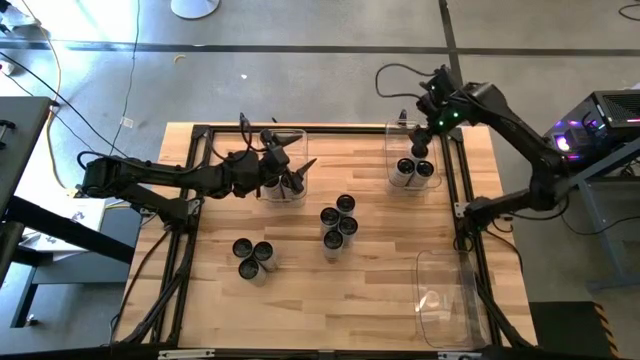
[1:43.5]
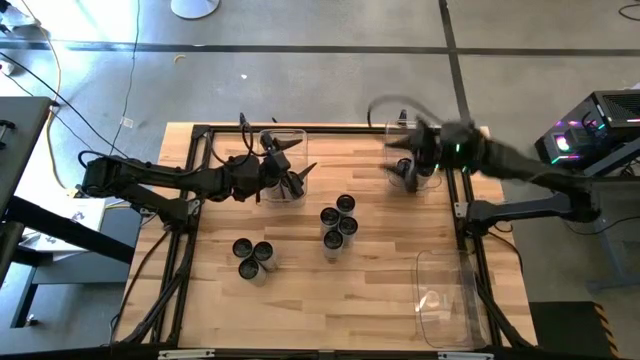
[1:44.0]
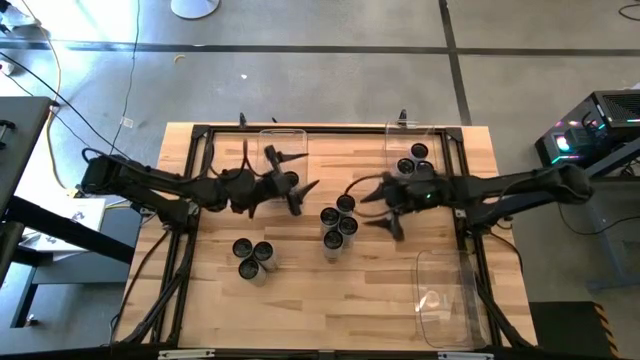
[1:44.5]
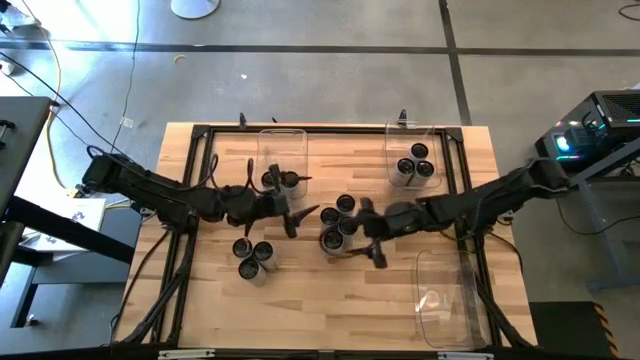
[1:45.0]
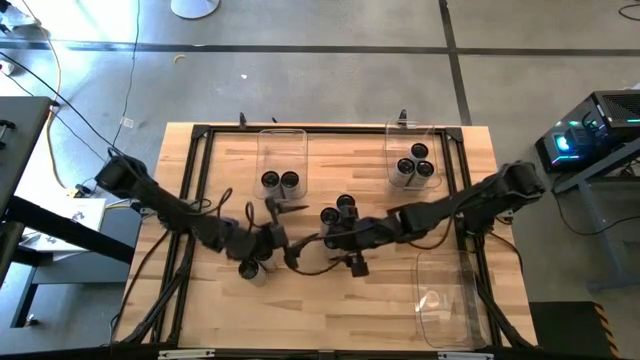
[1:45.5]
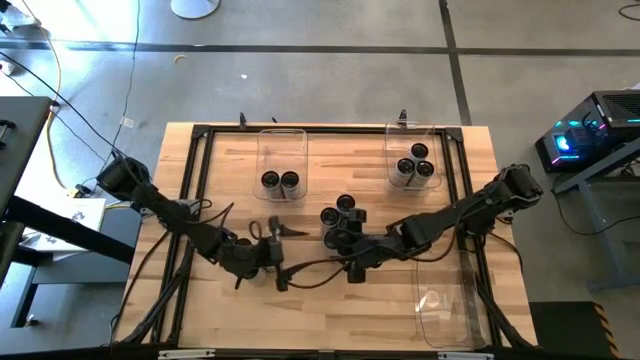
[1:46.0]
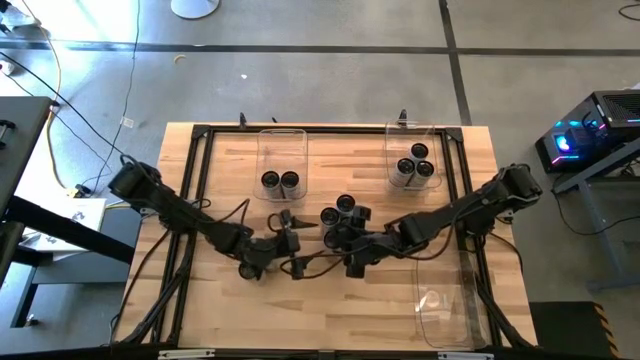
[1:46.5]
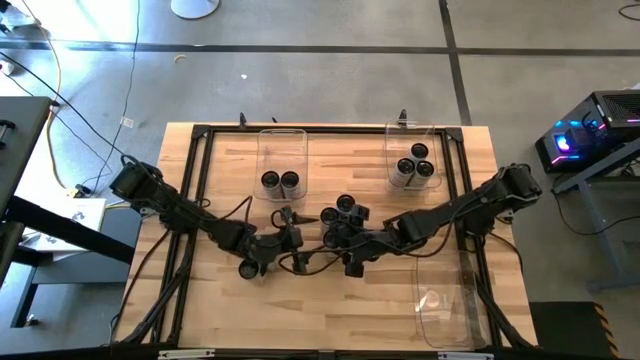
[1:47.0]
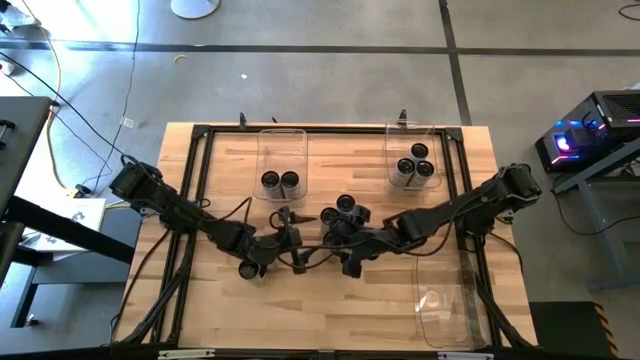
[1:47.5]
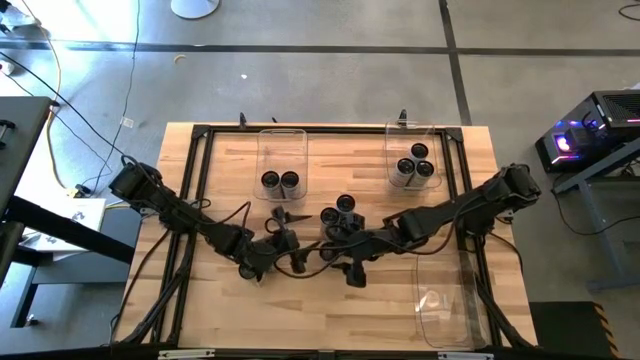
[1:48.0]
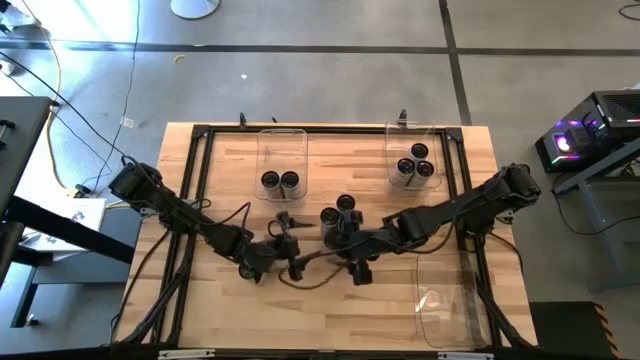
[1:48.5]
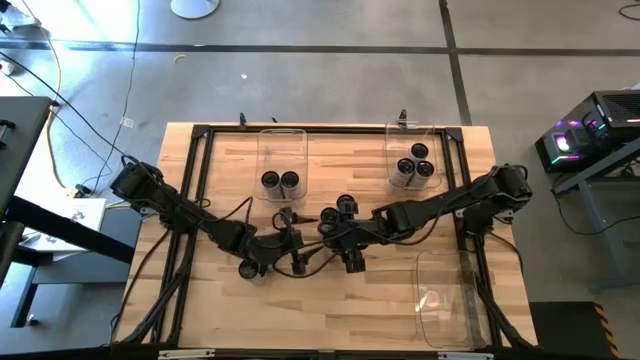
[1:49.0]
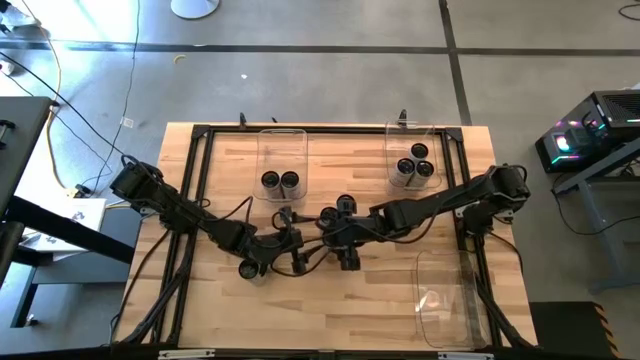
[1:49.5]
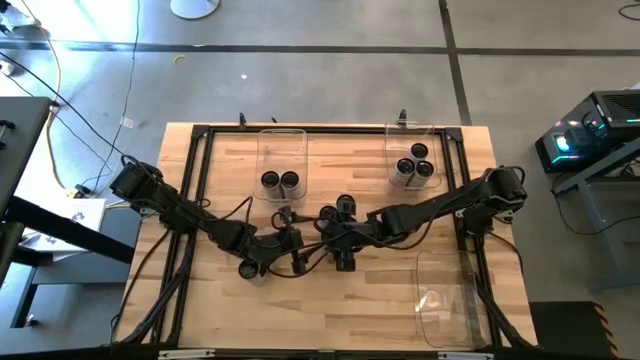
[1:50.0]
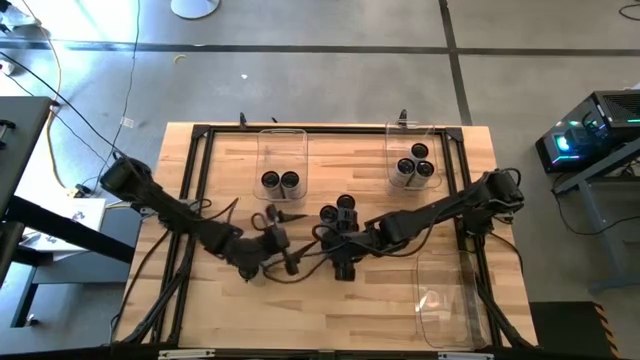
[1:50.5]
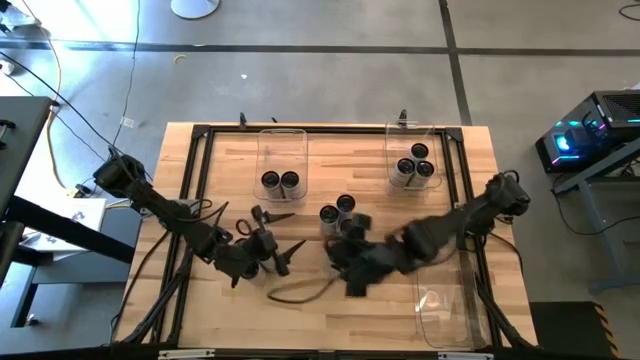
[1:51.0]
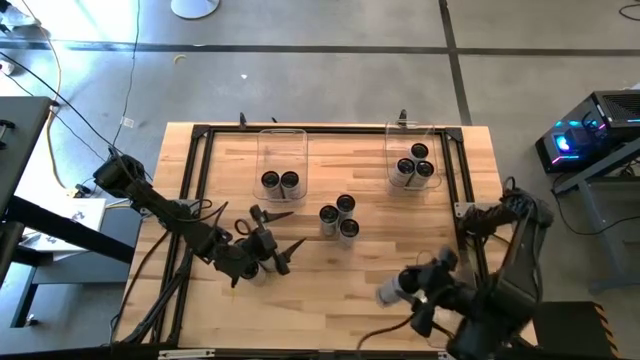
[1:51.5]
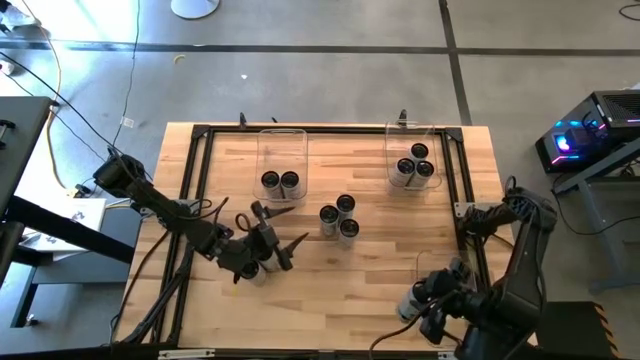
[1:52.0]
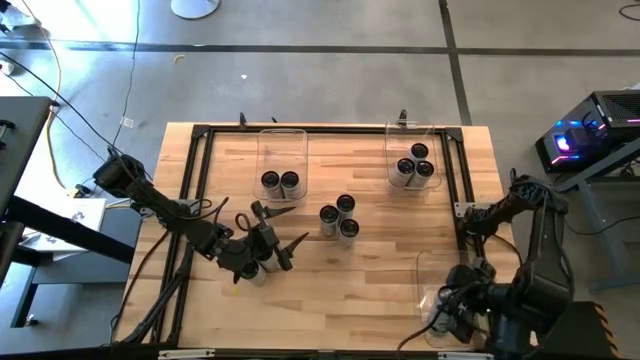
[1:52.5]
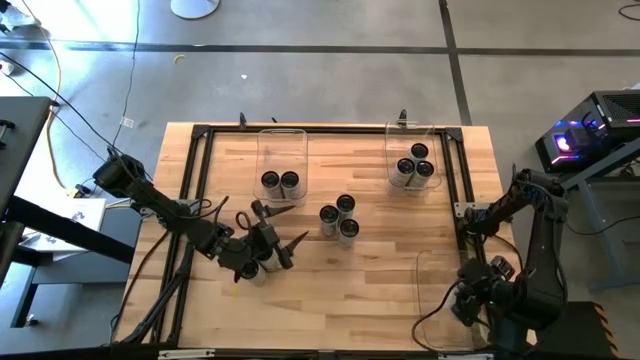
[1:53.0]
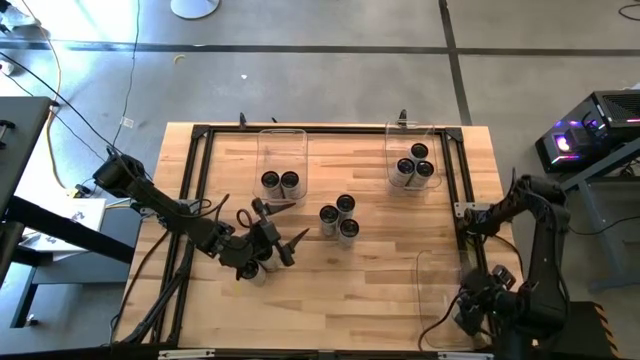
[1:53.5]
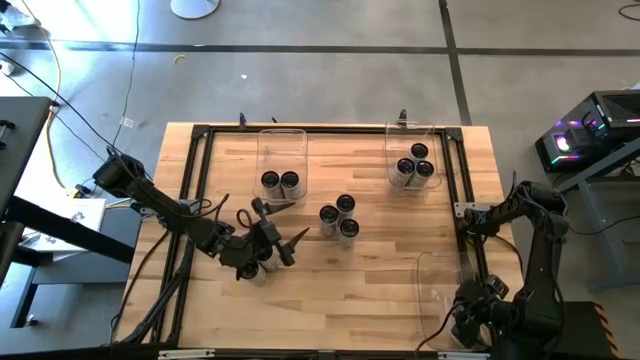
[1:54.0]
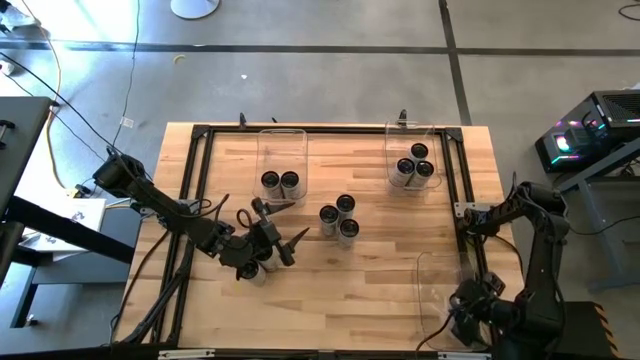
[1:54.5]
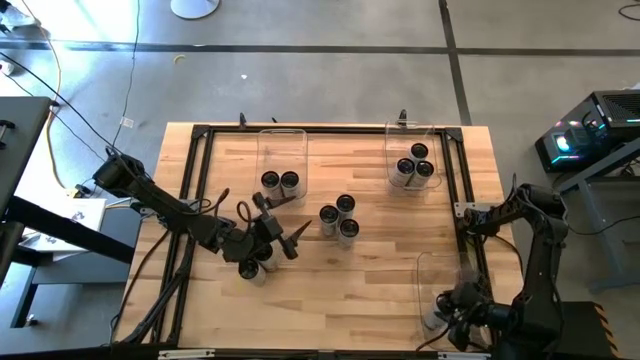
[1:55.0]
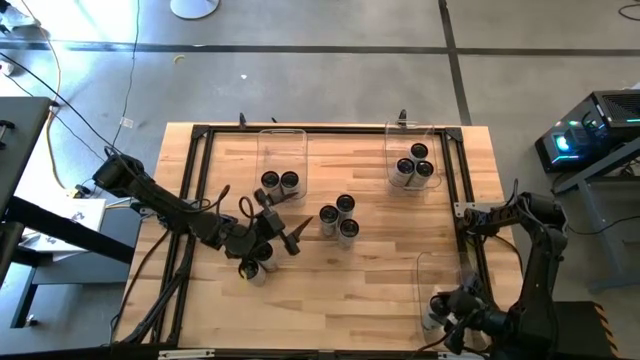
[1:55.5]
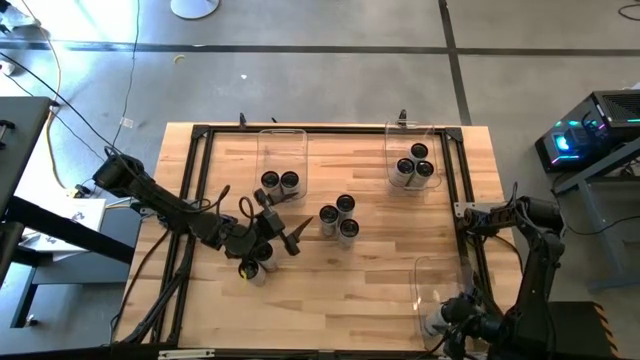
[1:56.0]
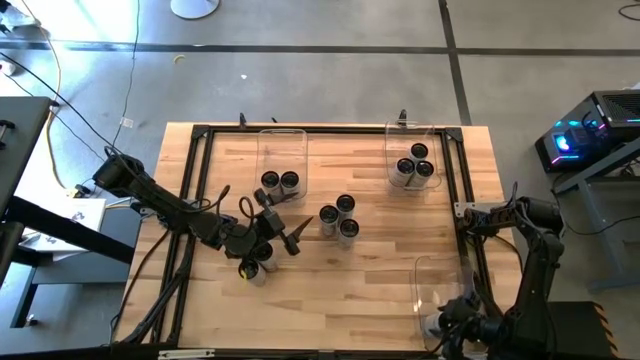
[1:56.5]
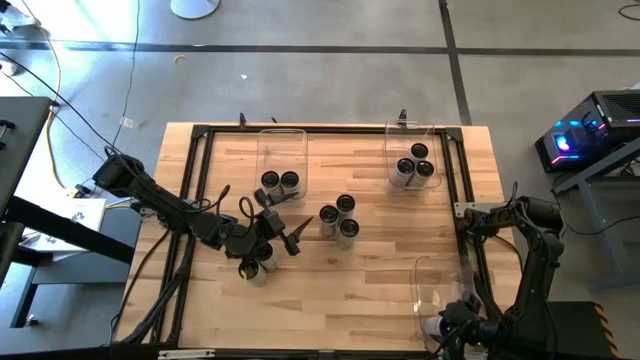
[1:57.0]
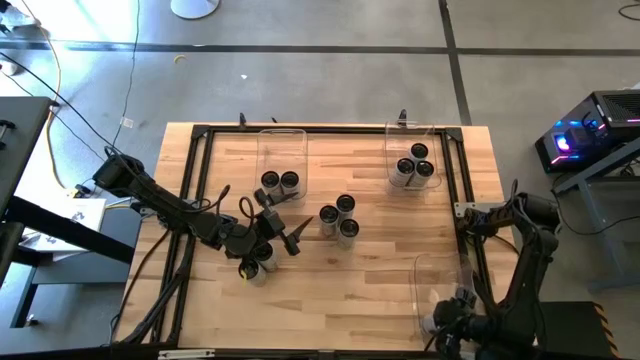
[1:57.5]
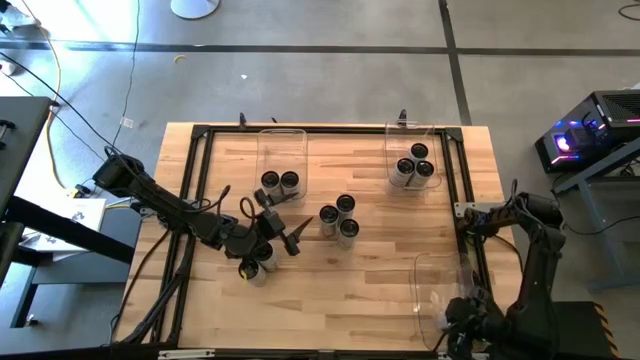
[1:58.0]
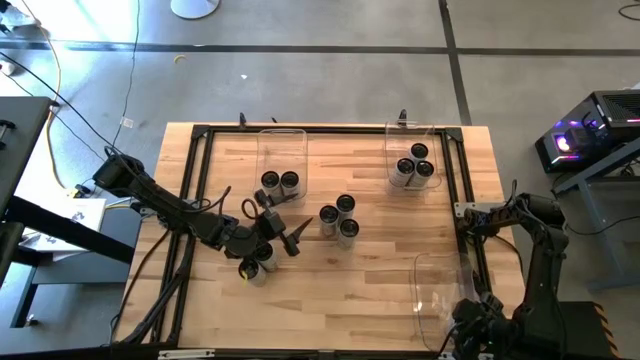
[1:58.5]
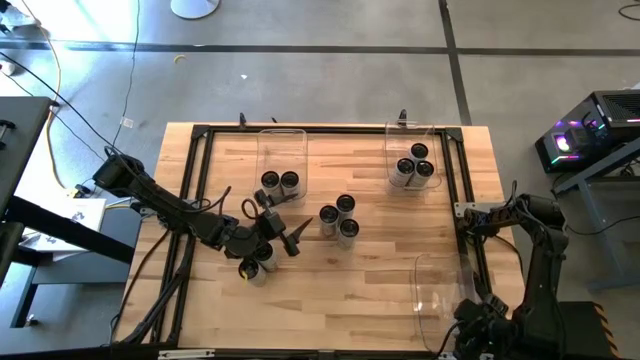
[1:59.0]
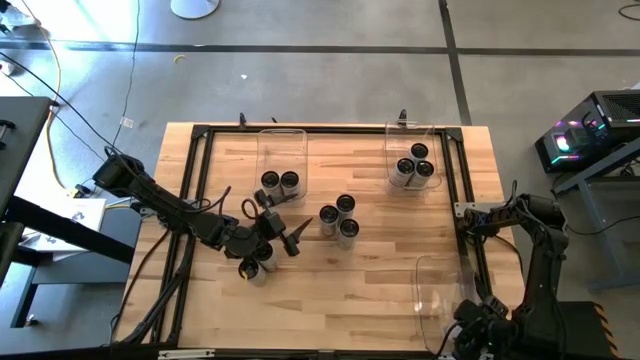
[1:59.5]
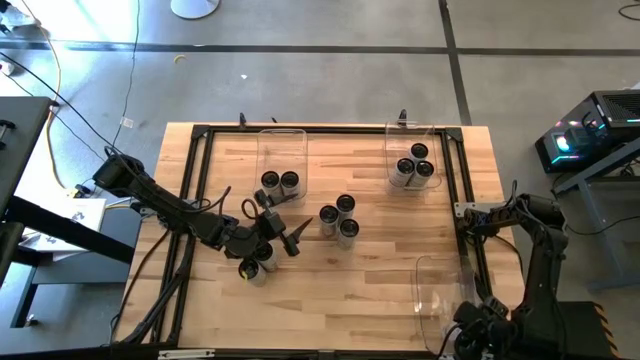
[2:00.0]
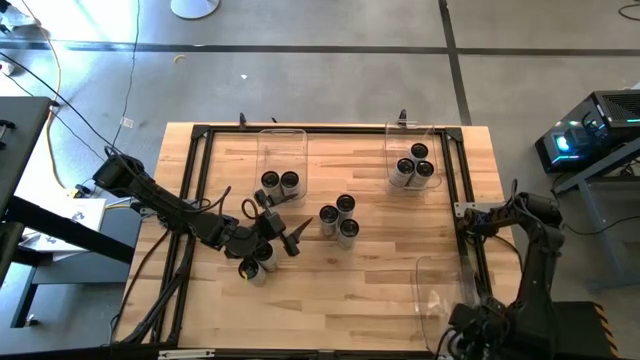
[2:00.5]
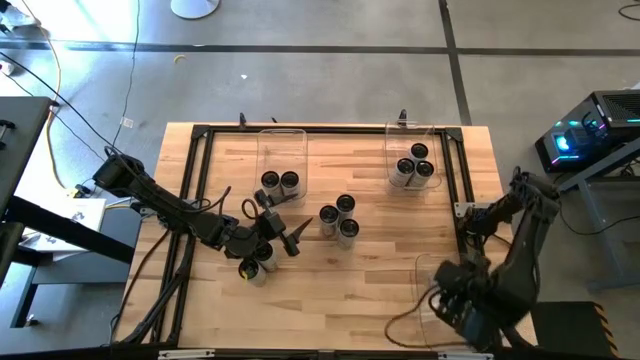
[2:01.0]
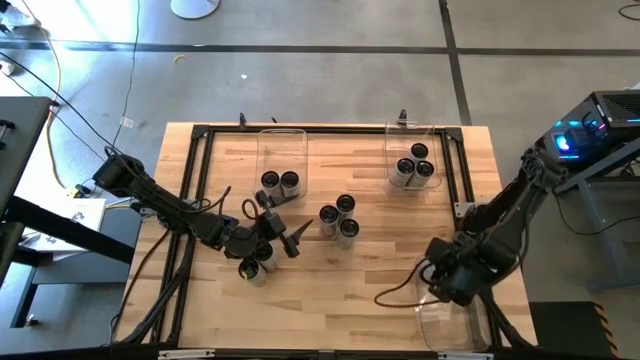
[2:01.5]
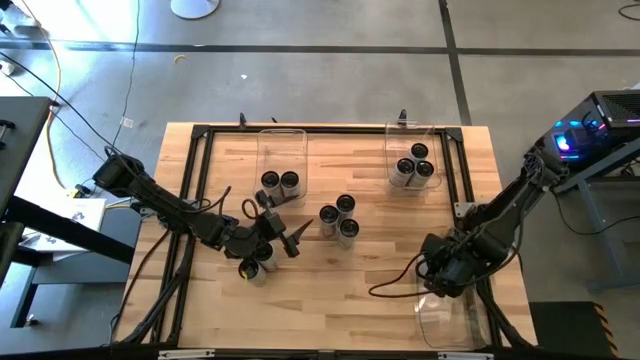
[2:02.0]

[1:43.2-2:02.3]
Task: Sort soda cans
Put the white-blue soda can into the bottom transparent bin

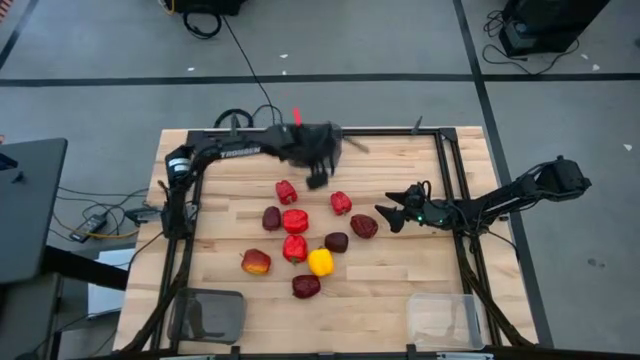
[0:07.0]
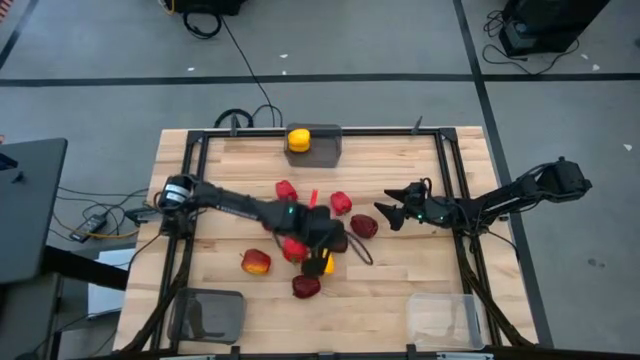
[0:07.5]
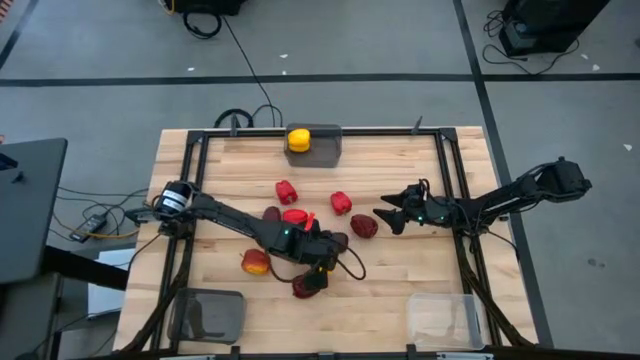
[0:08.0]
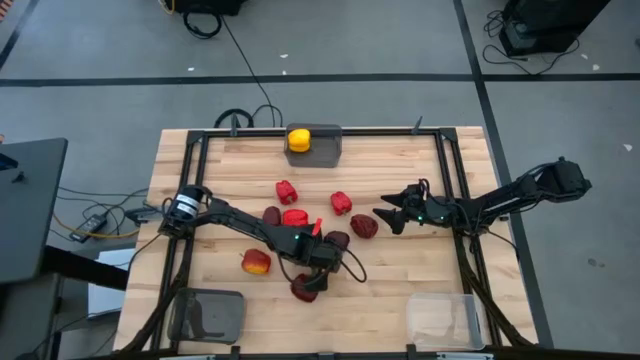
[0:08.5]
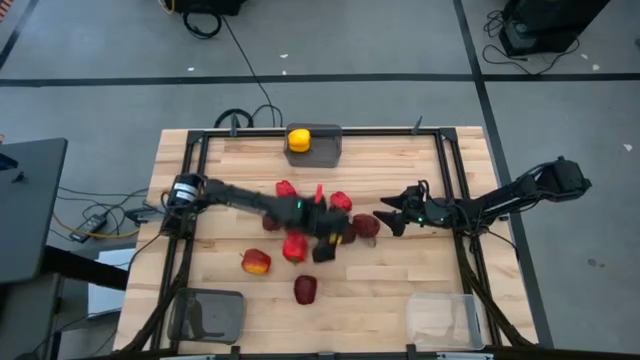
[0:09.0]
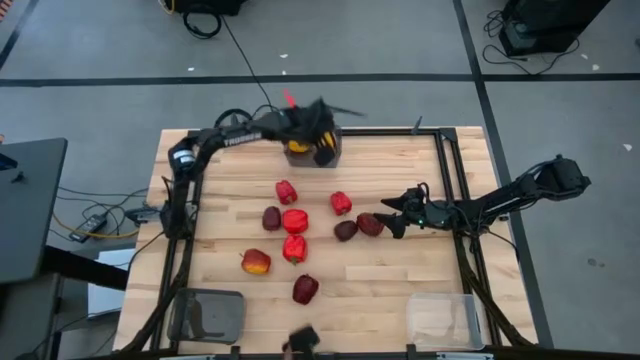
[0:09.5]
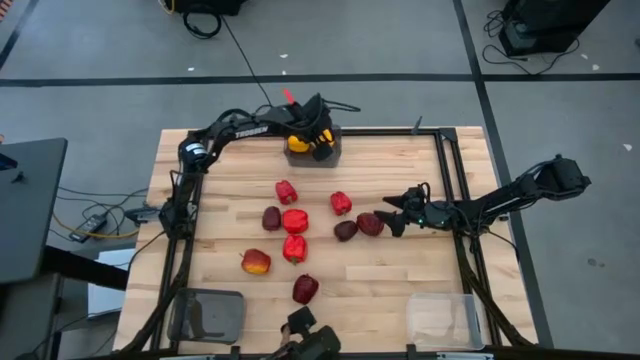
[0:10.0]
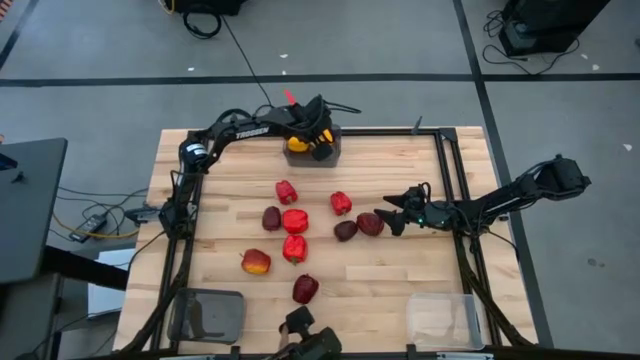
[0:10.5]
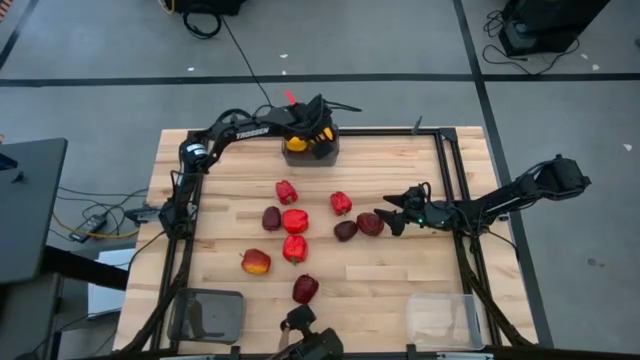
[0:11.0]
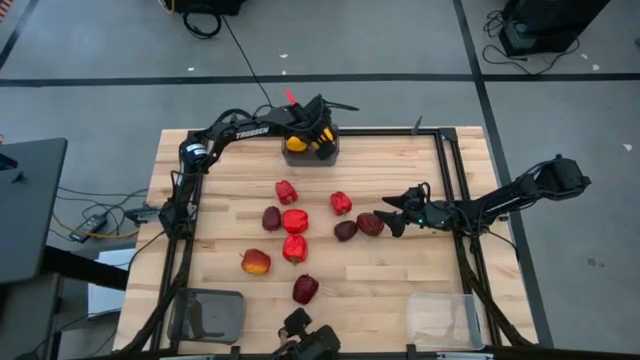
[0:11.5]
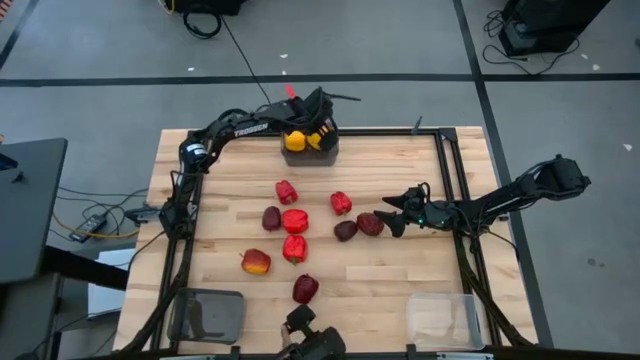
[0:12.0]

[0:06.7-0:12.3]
Task: Sort produce into baskets
Put the yellow bell pepper into the top black bin
